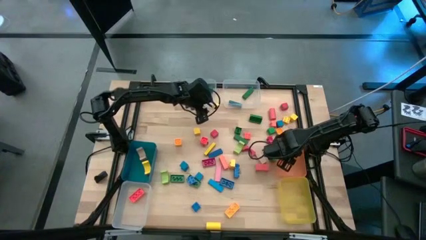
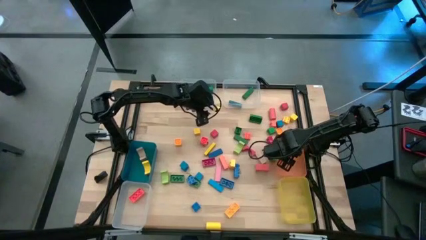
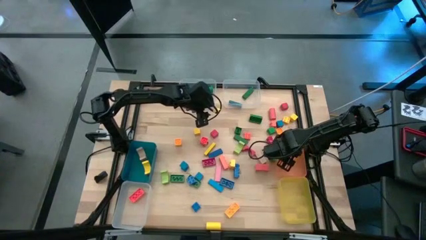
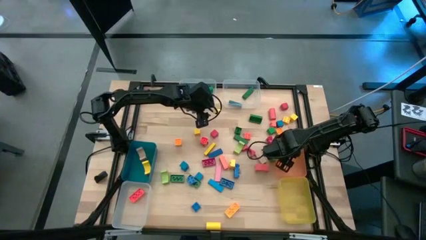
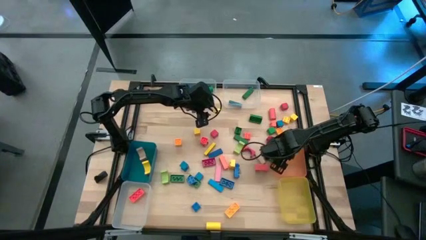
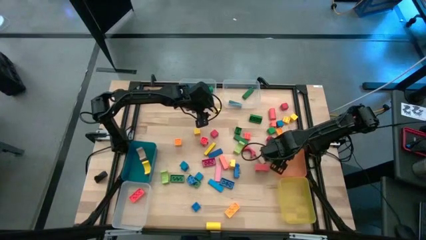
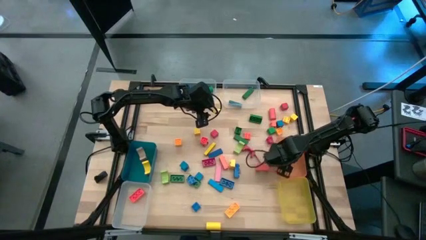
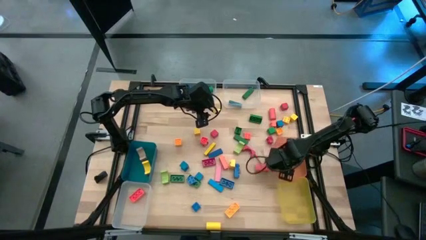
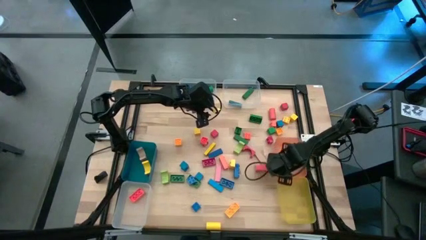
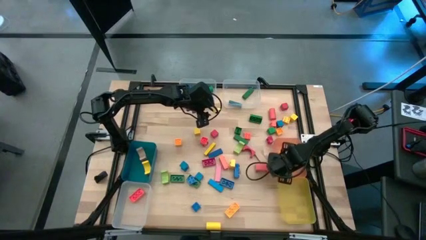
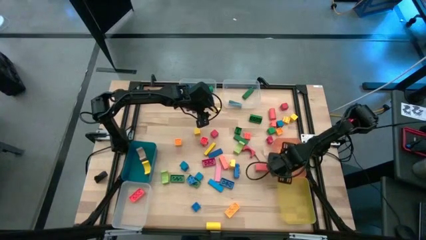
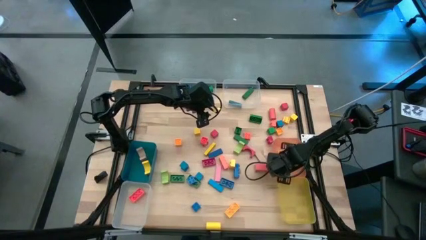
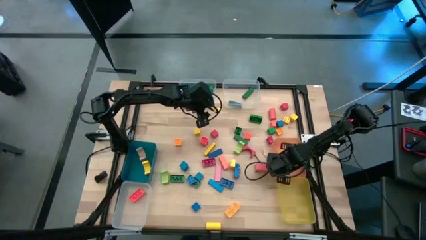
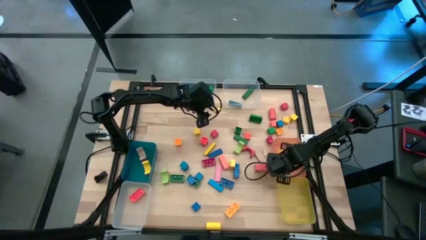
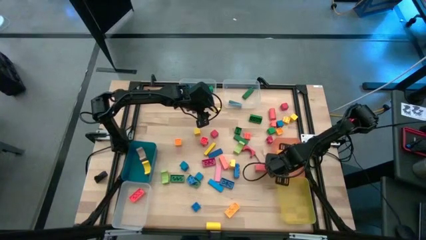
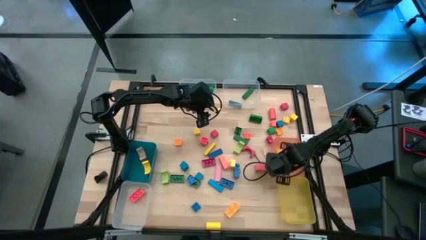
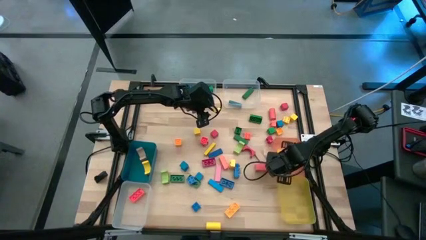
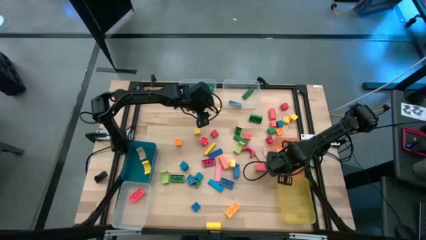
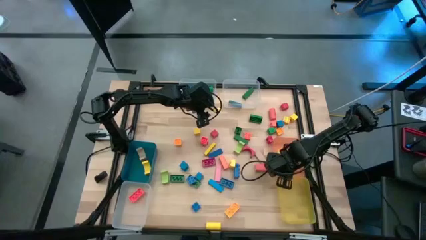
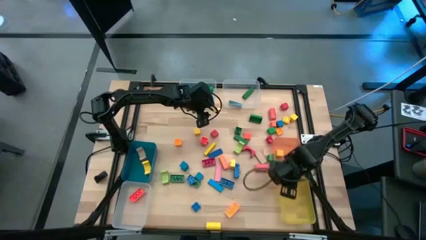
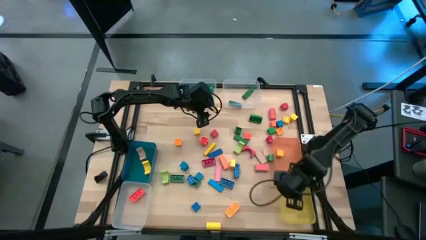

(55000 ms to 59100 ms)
Task: Sort blocks by size
Remove the yellow game piece from the orange bin into the yellow bin

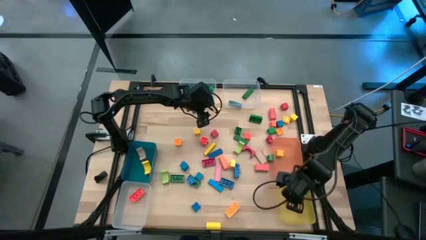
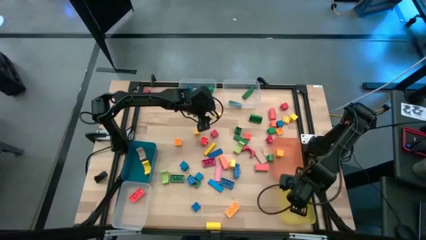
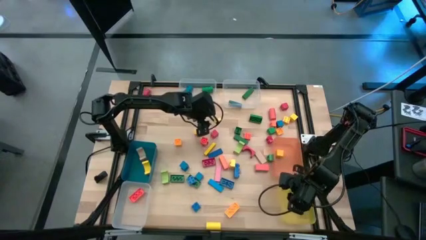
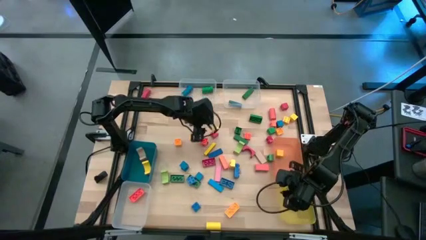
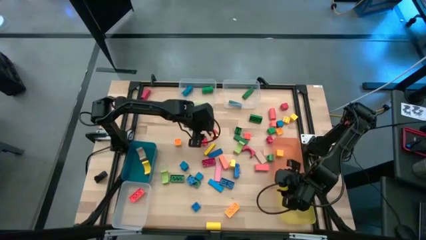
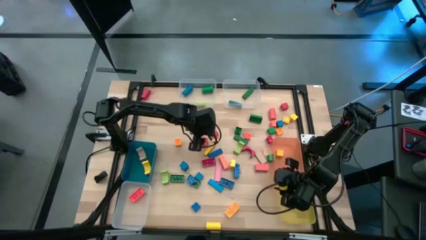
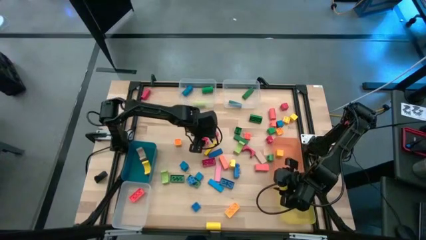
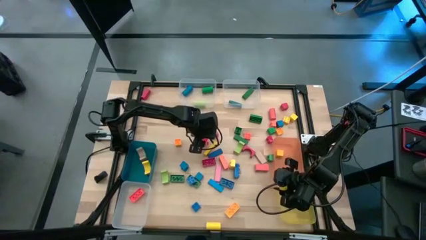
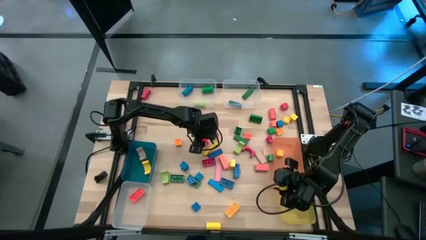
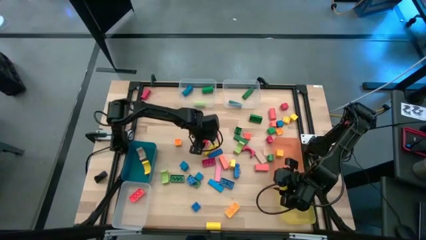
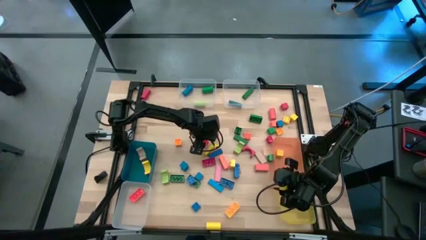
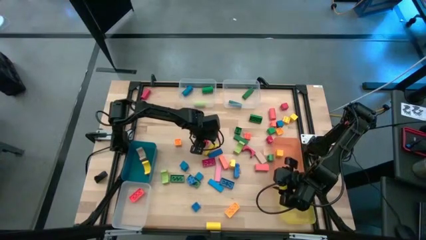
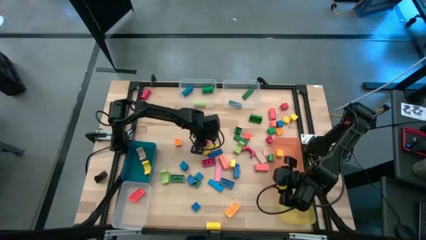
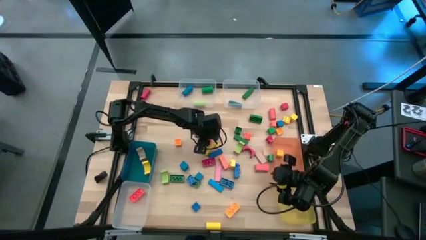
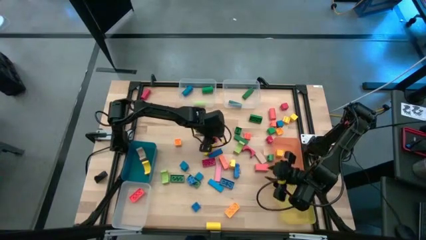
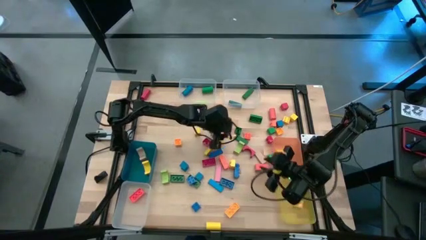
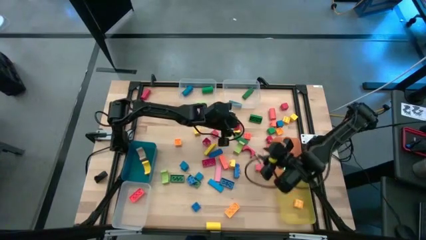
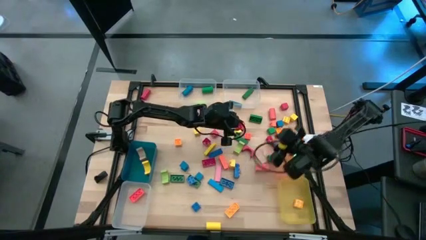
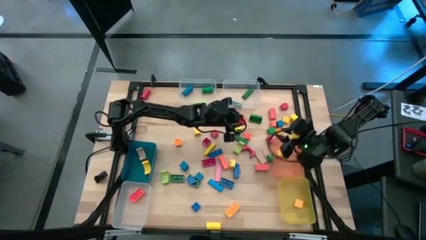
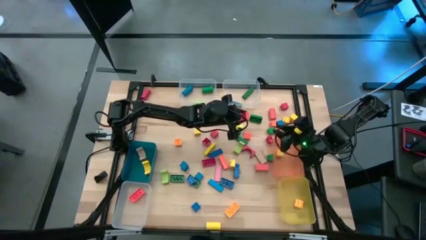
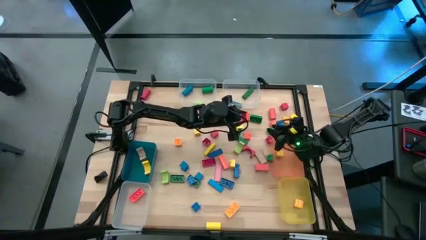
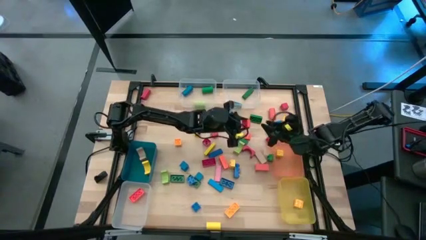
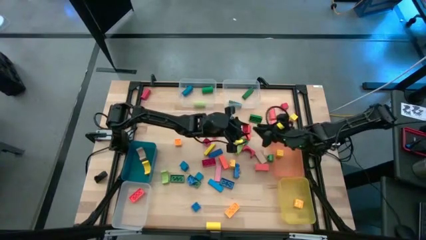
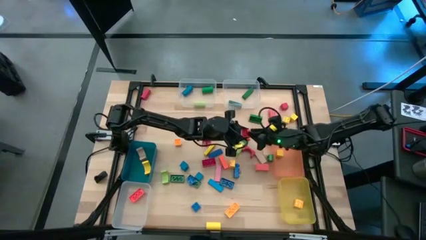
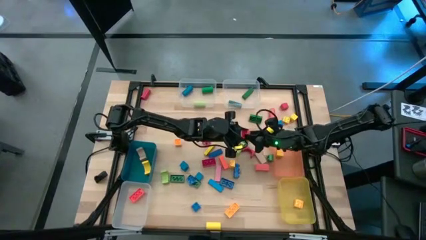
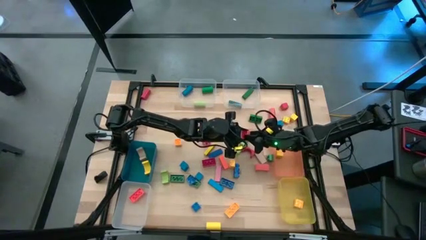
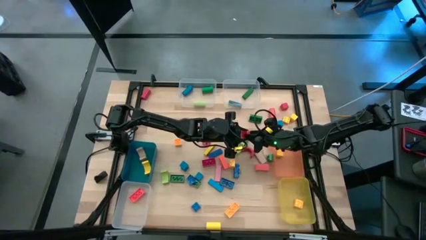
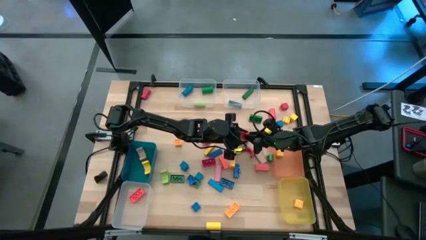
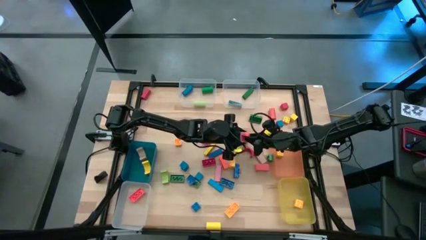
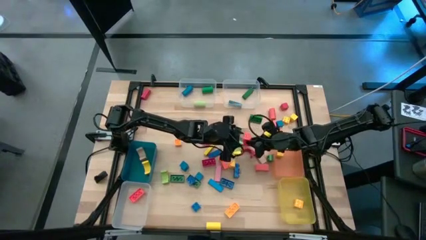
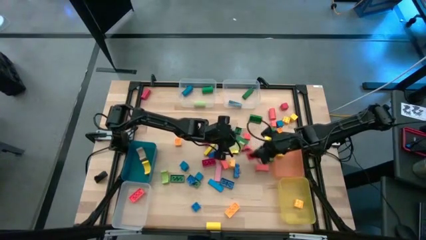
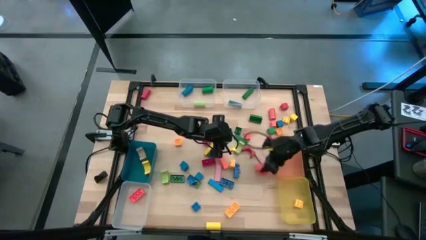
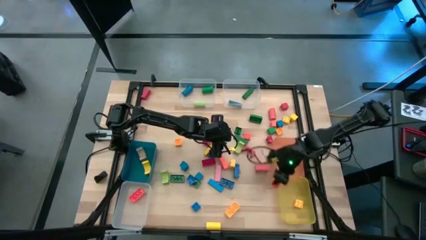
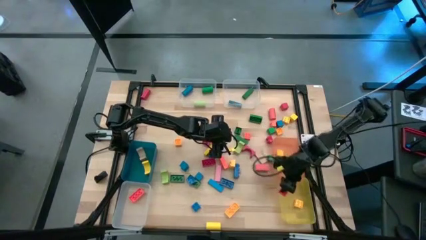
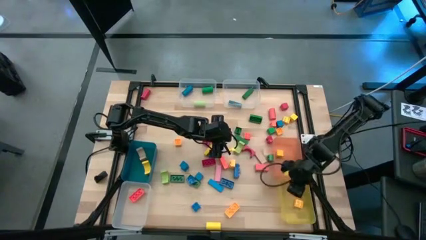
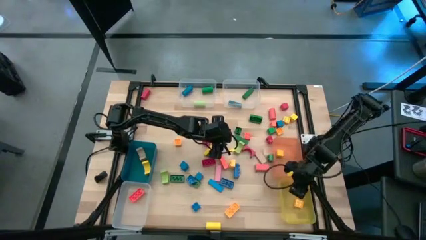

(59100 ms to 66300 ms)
Put the orange game piece into the yellow bin

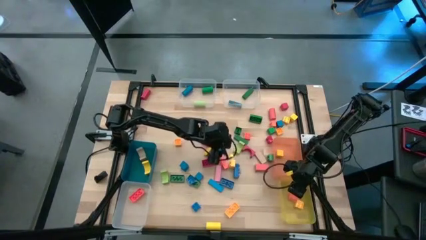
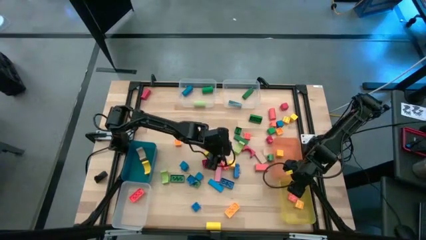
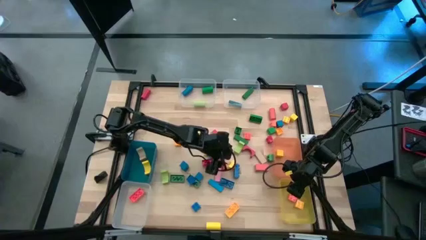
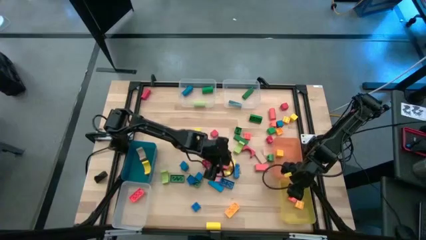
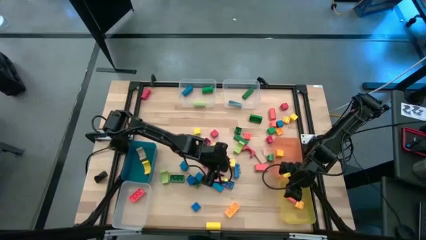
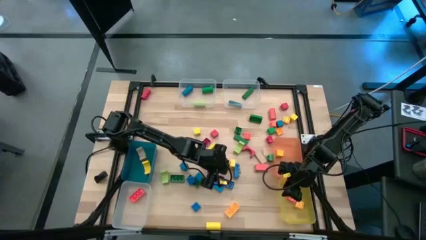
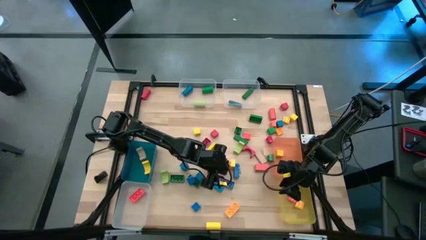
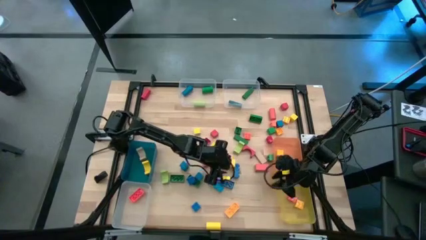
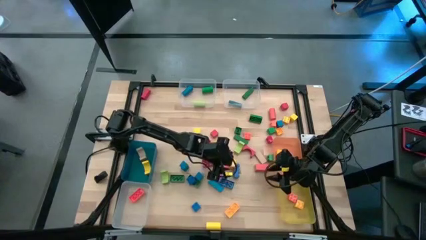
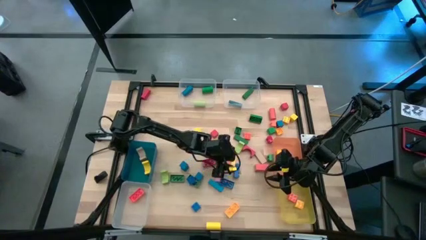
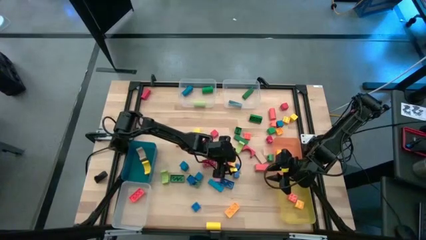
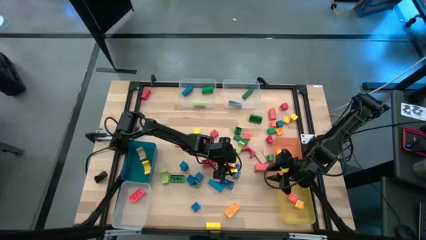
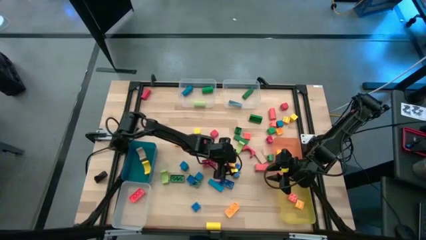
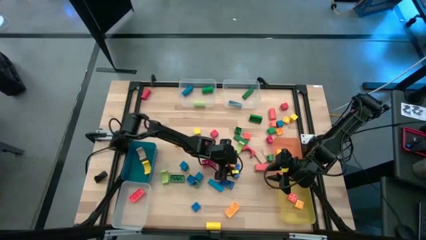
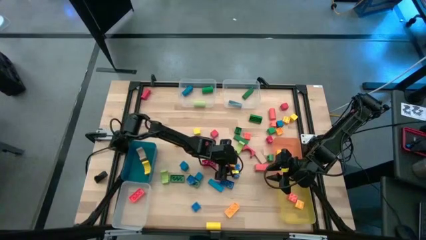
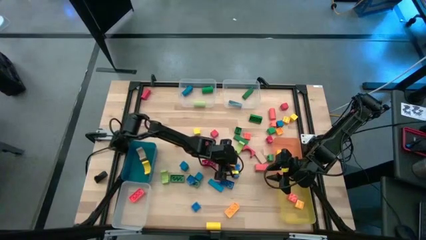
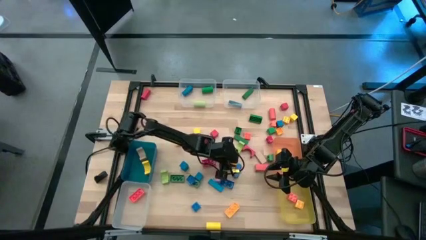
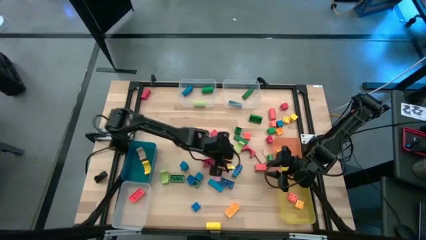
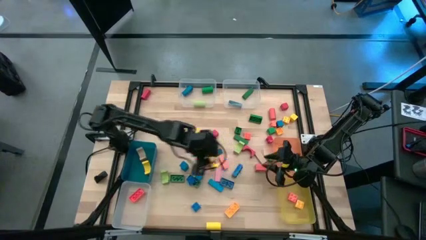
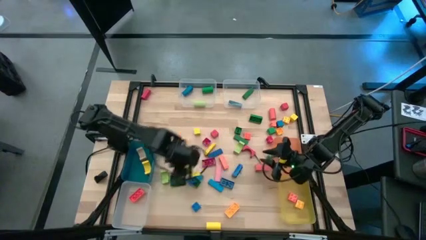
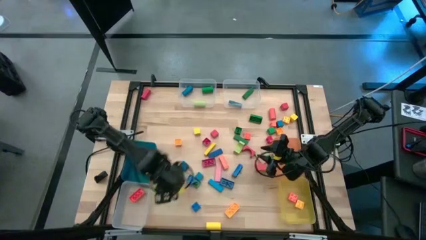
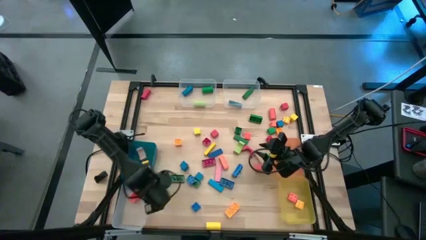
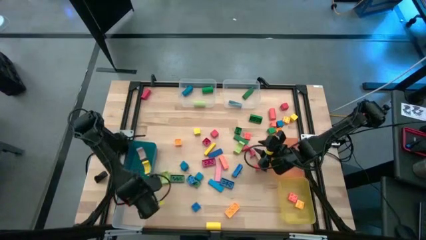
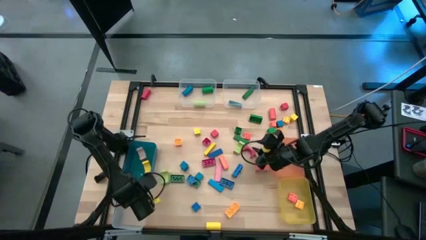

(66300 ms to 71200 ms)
Put the yellow block into the bottom left transparent bin
